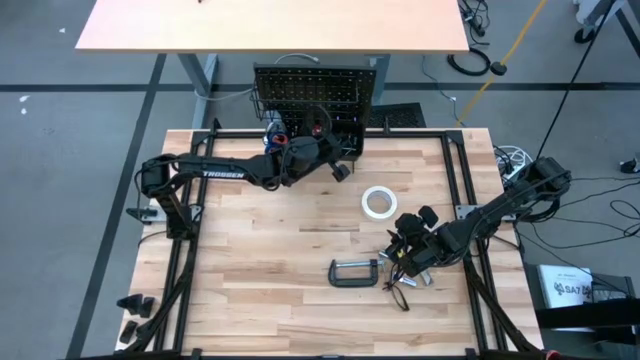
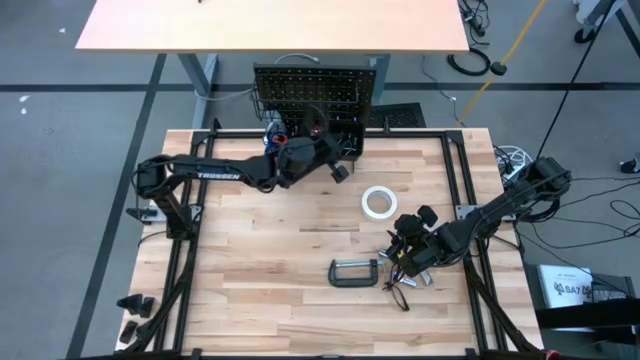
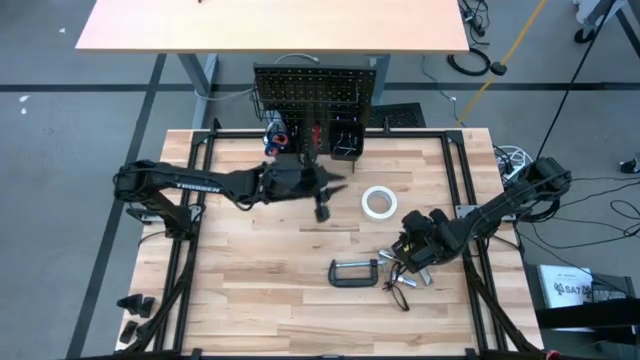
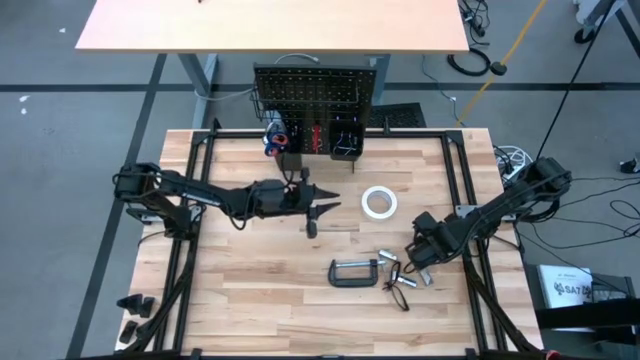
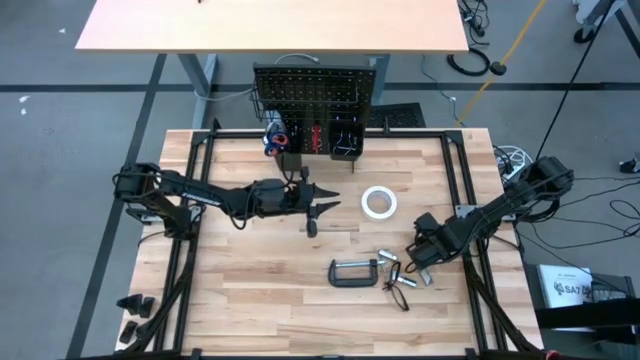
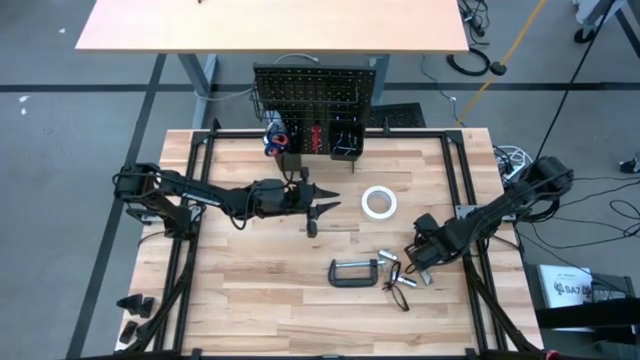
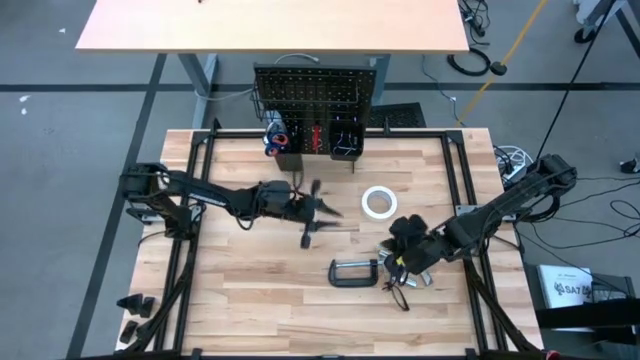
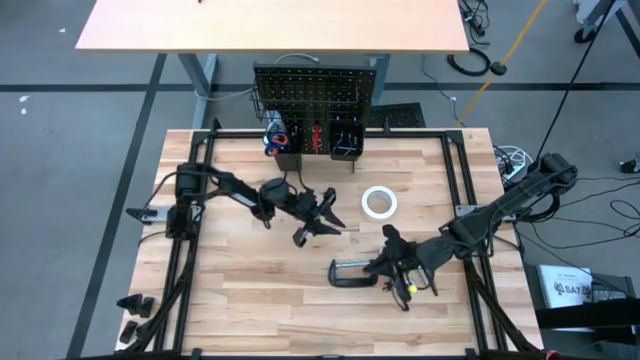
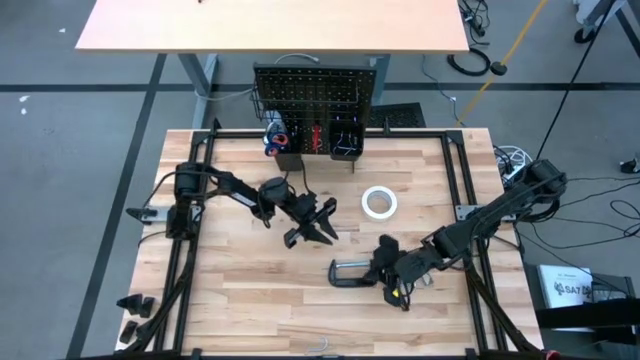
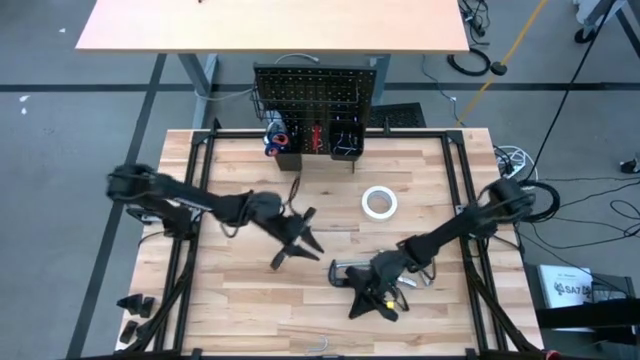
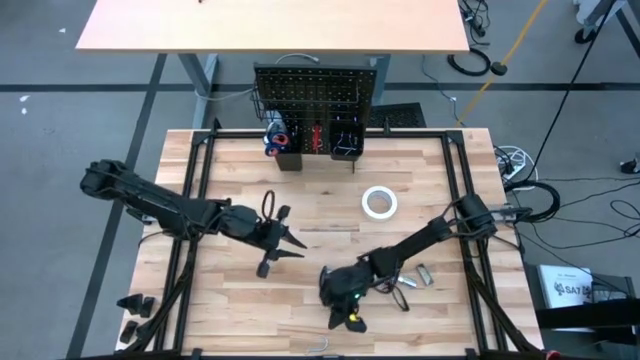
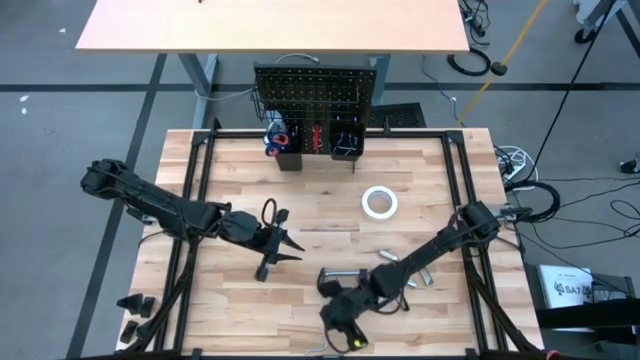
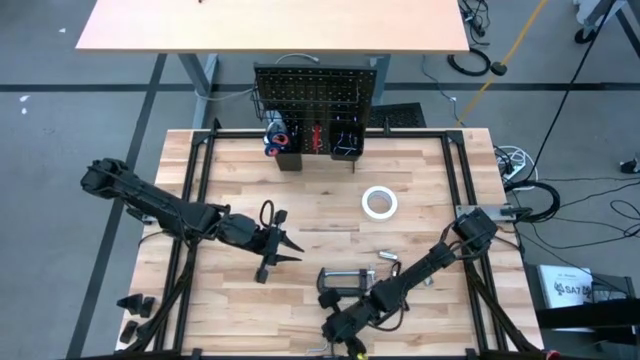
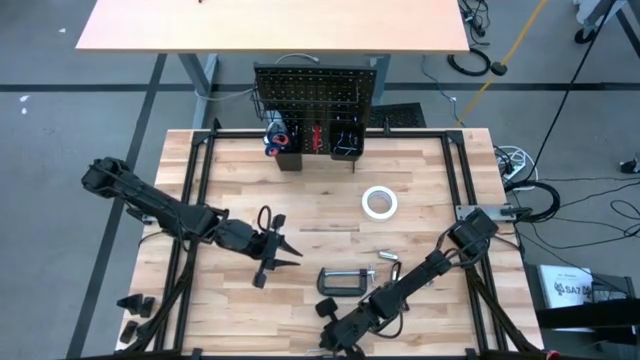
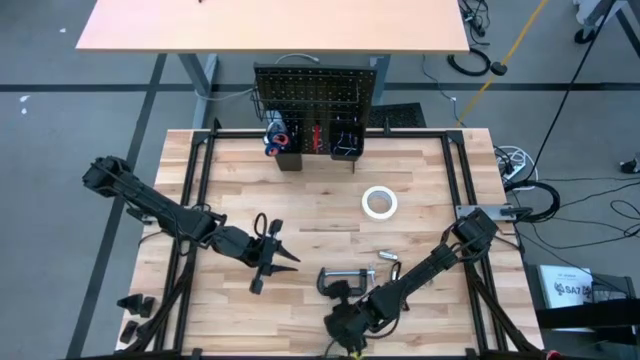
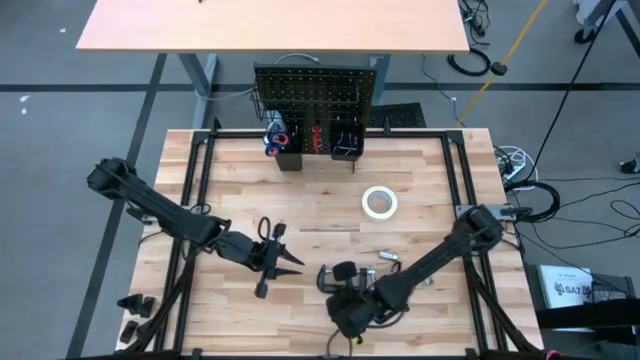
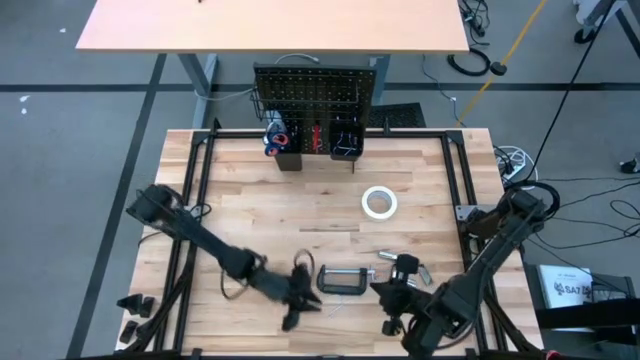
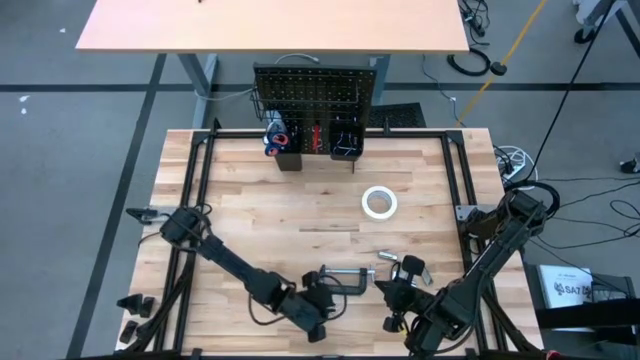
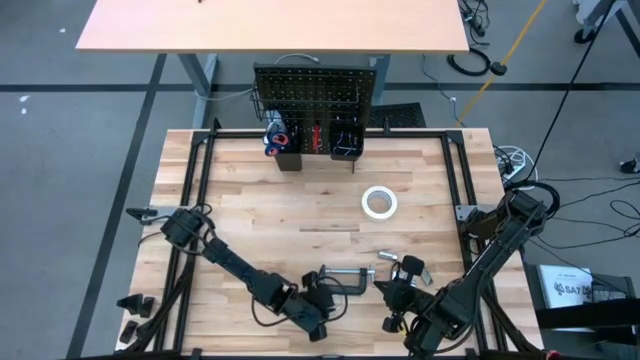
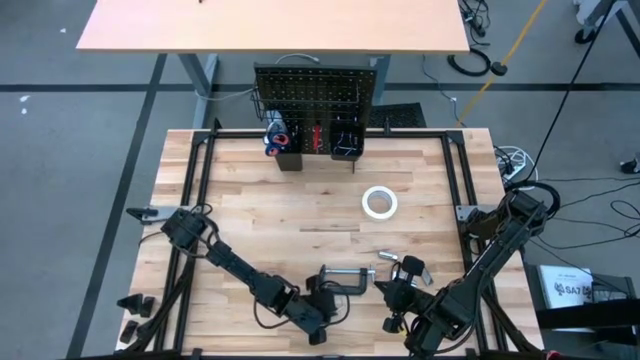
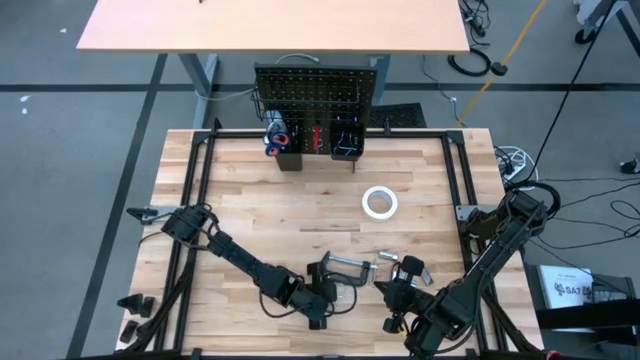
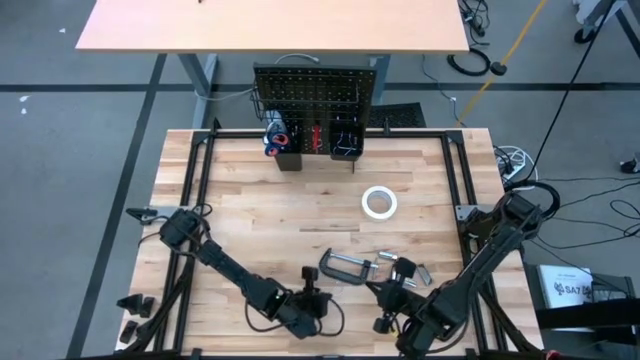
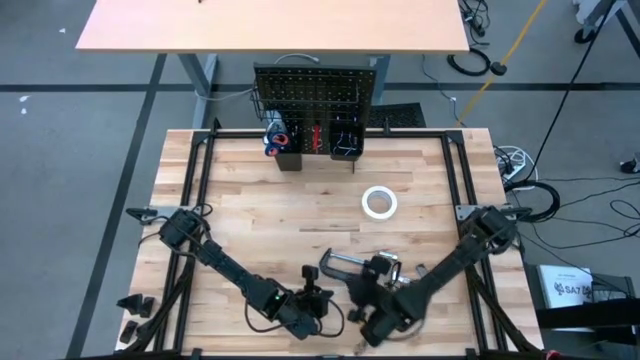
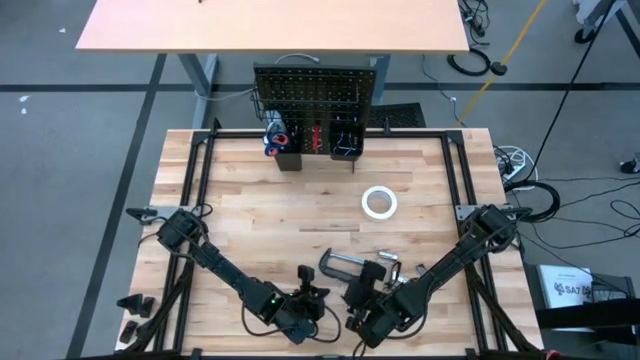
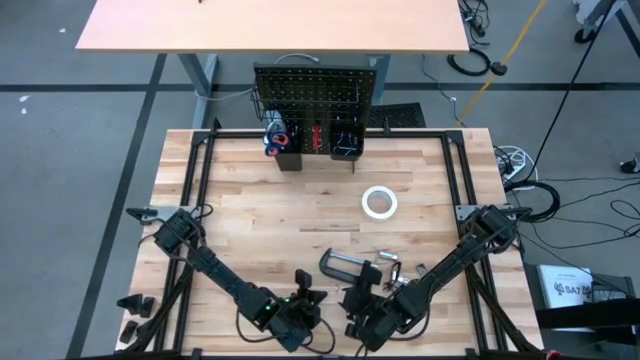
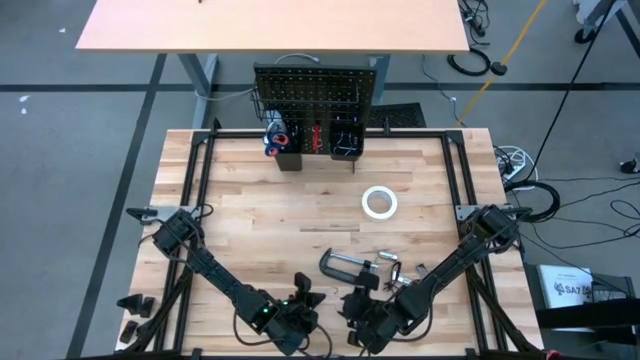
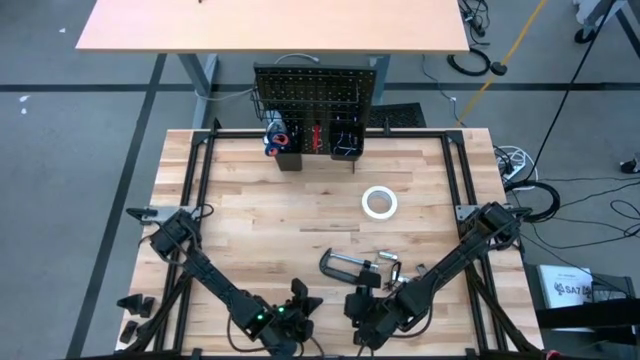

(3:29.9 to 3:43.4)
Task: Hang tools onto peg board
Put the hanger hook on the right lower deck of the pegboard
